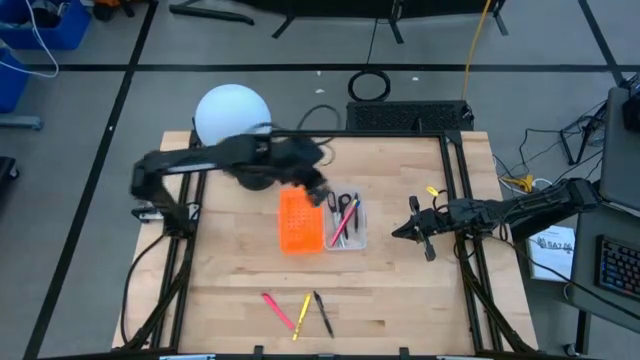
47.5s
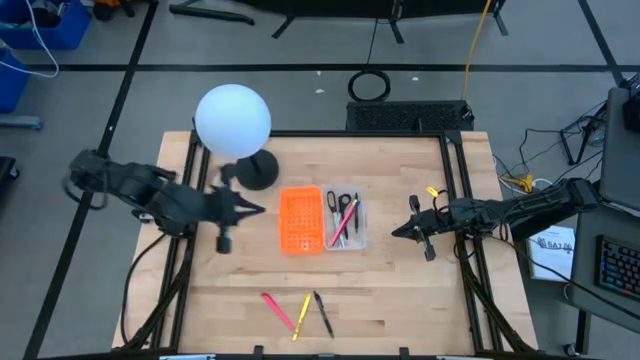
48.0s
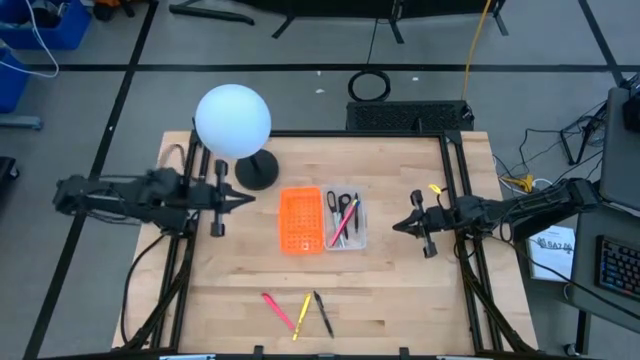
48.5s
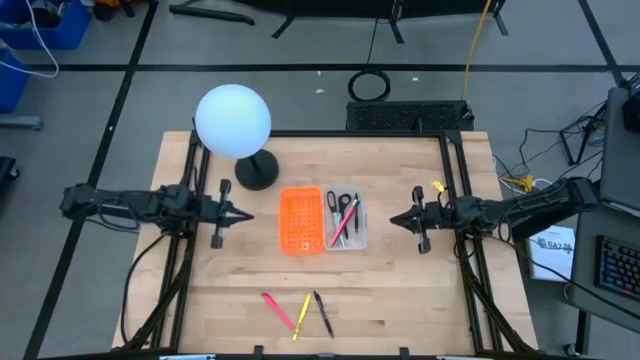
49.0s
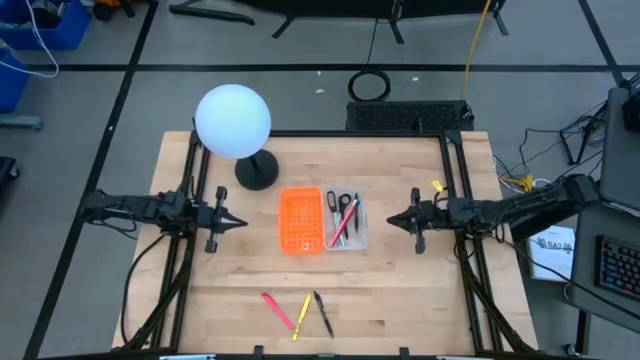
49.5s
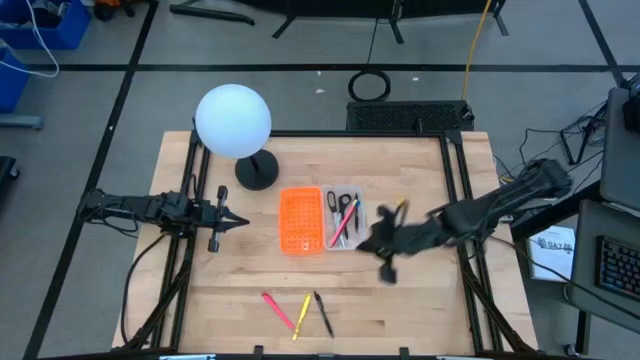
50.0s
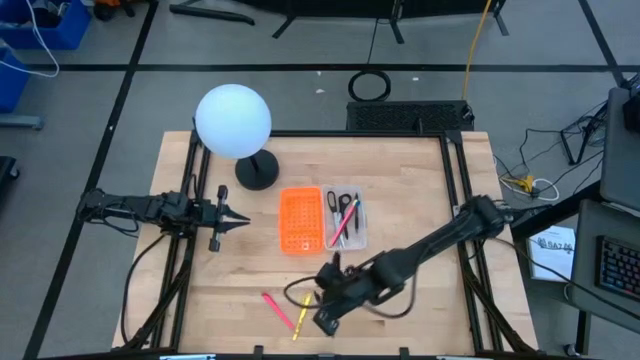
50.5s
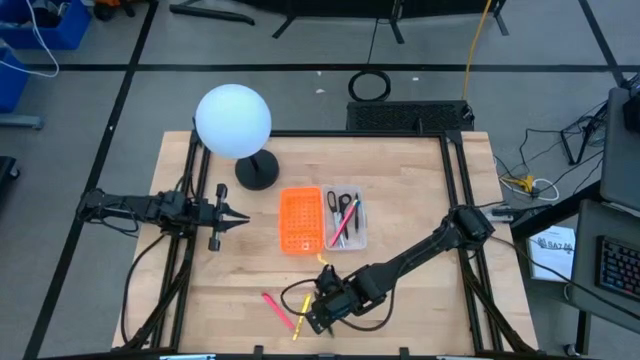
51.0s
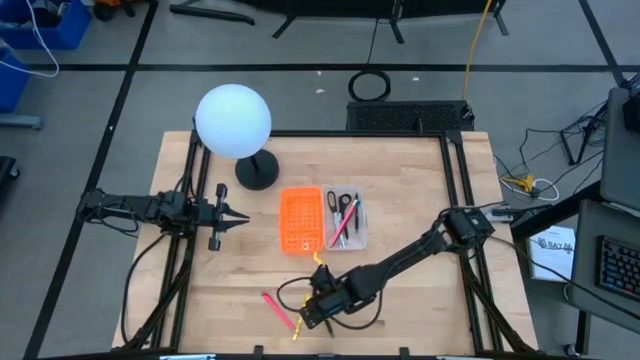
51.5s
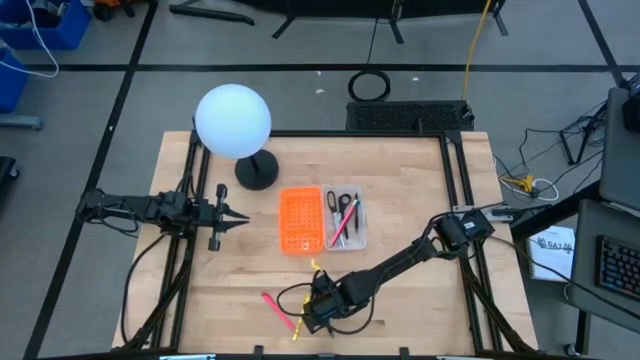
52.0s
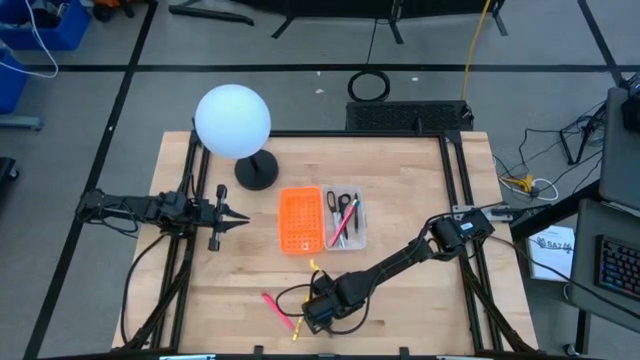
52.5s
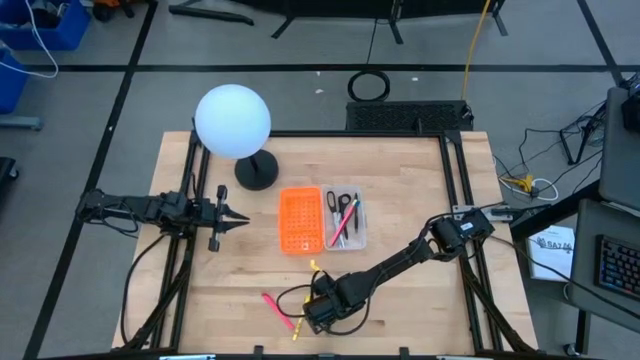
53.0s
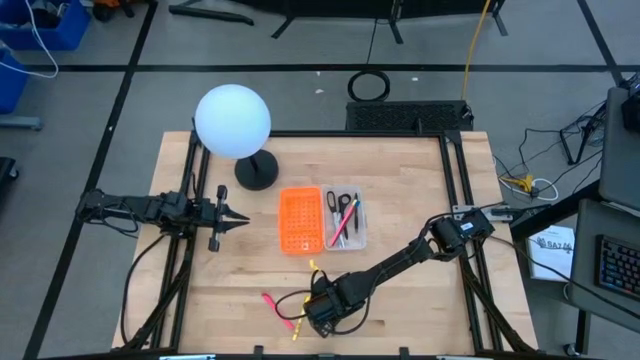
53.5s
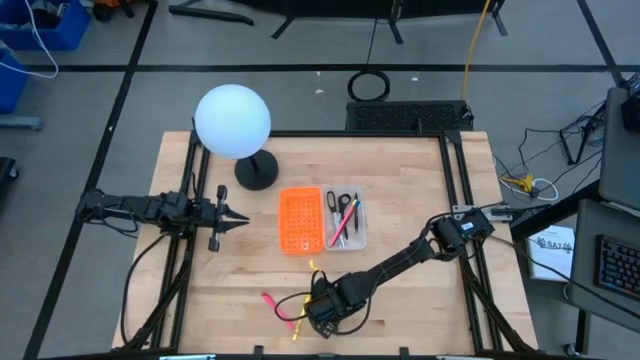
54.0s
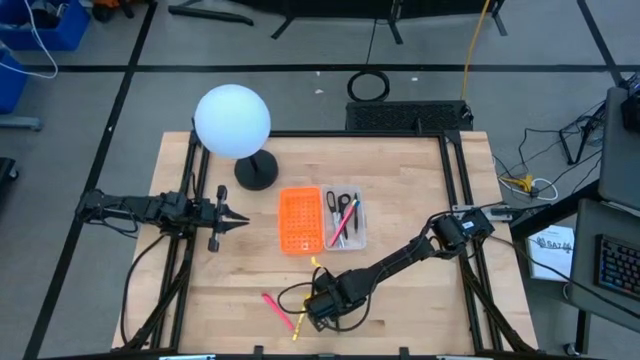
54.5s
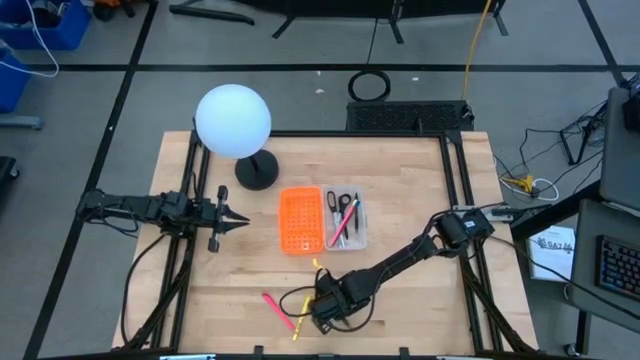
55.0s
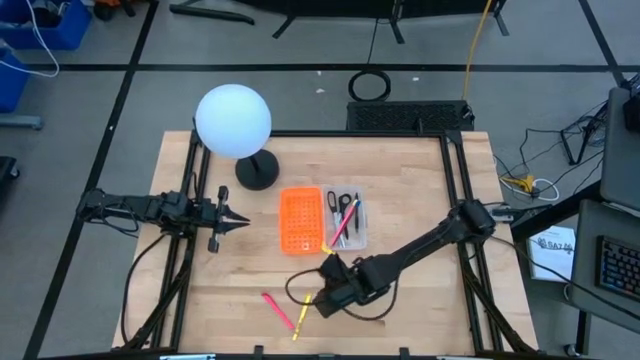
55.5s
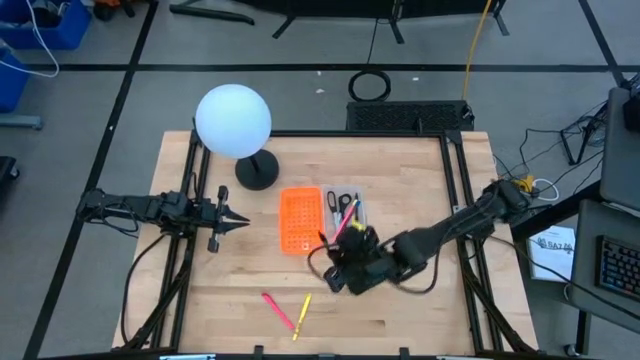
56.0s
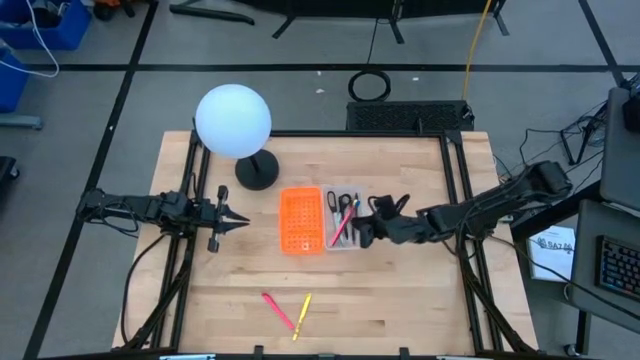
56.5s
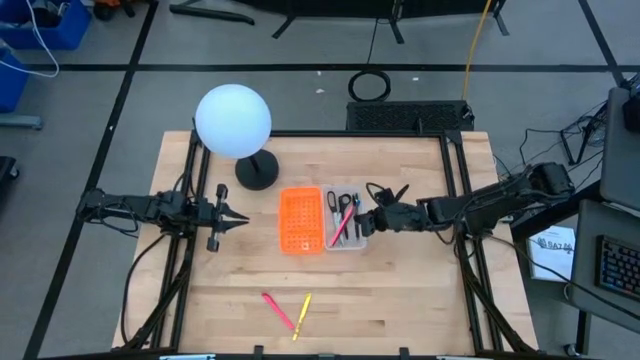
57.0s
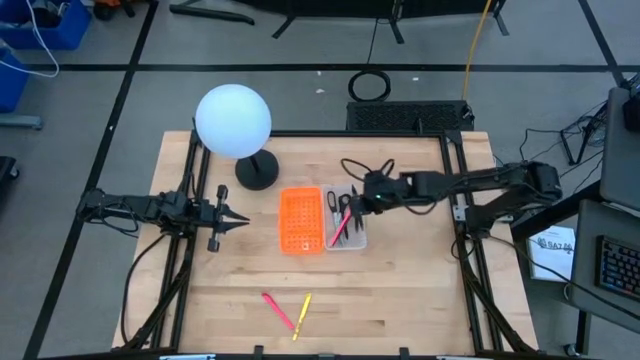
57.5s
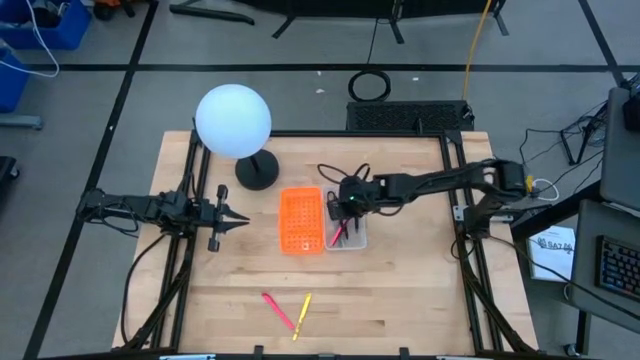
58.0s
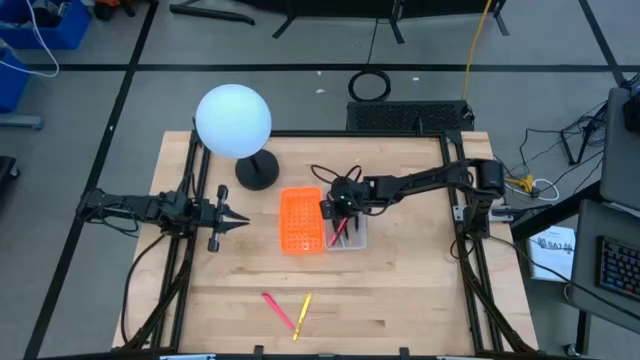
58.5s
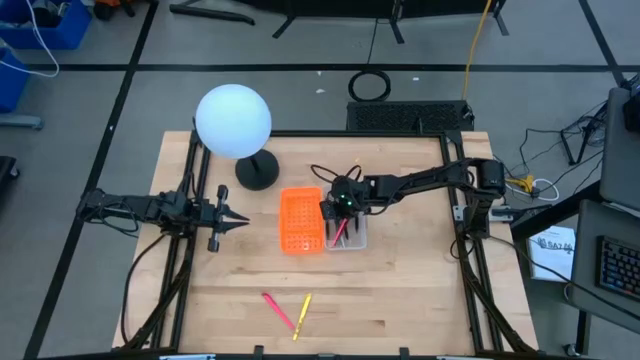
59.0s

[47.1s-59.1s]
Task: Pick & place school supplies into a supply box
Put the black pen into the orange supply box

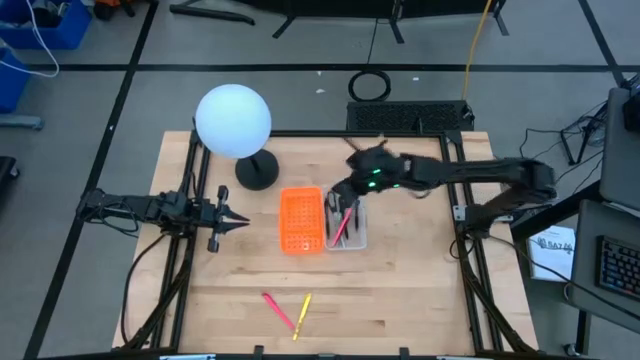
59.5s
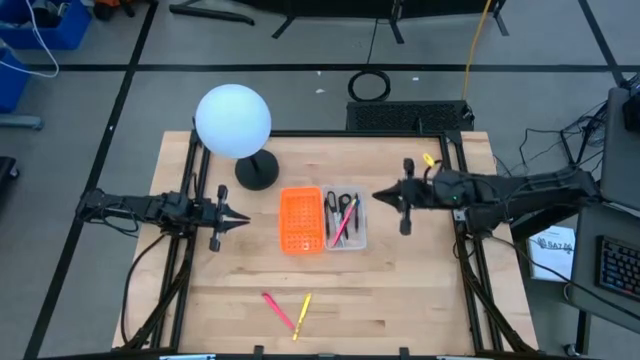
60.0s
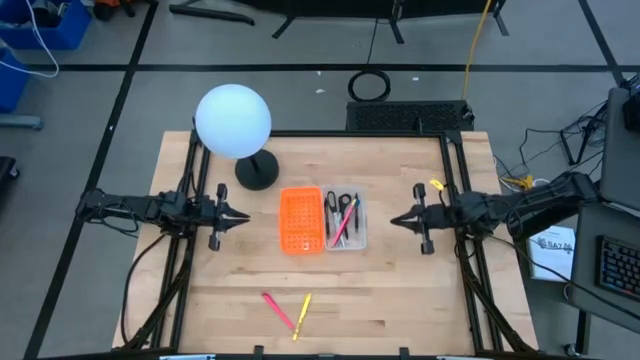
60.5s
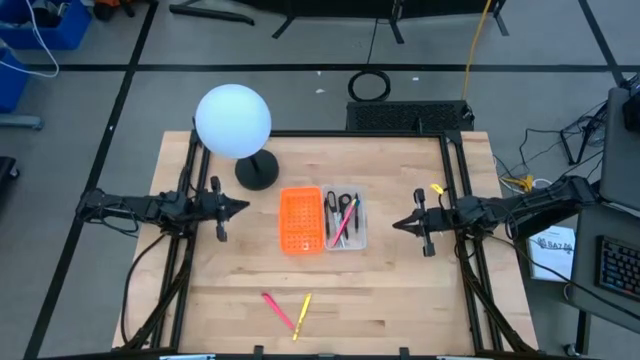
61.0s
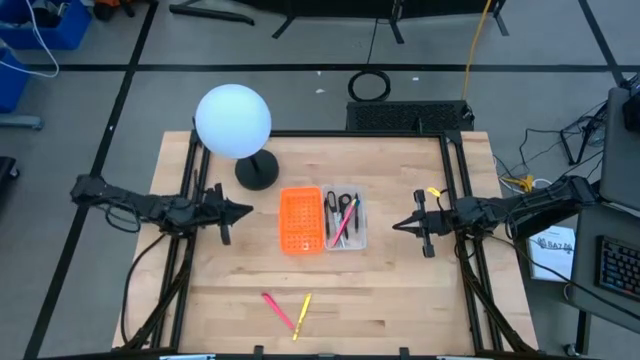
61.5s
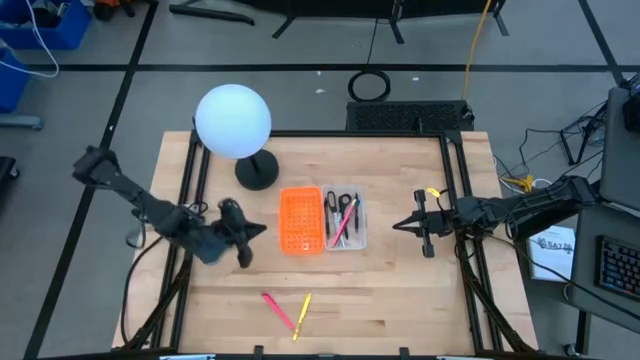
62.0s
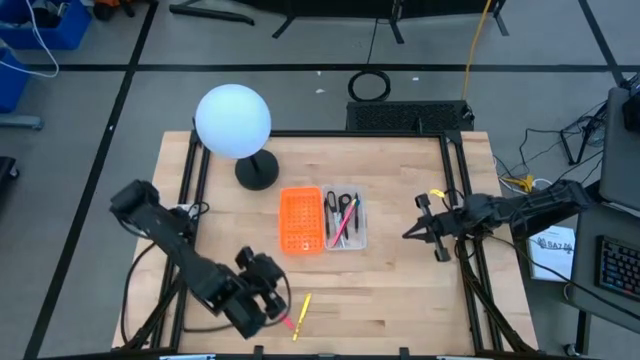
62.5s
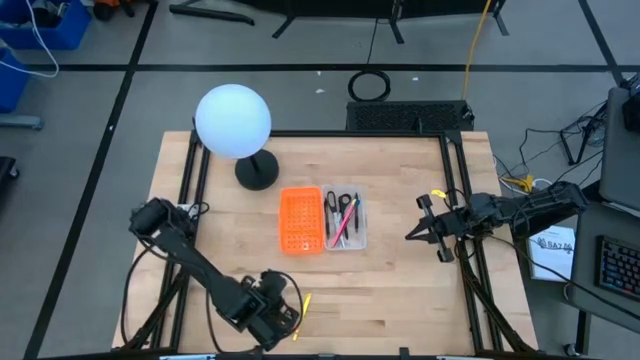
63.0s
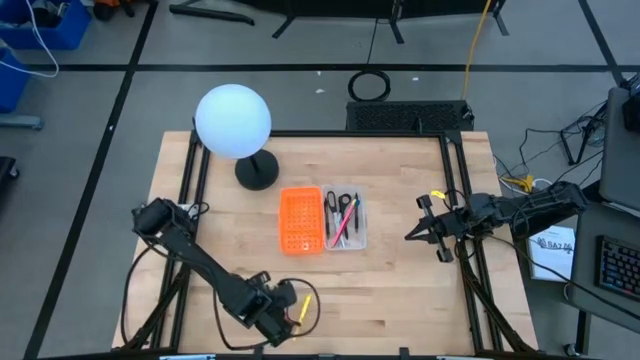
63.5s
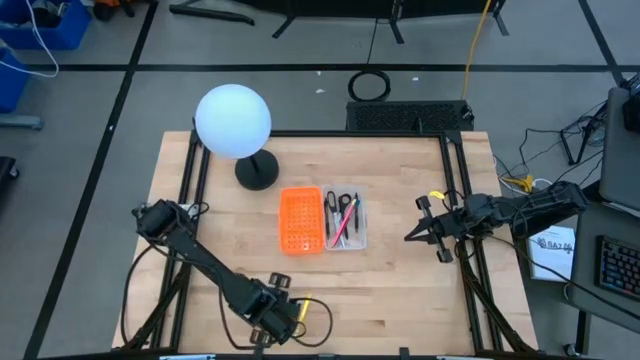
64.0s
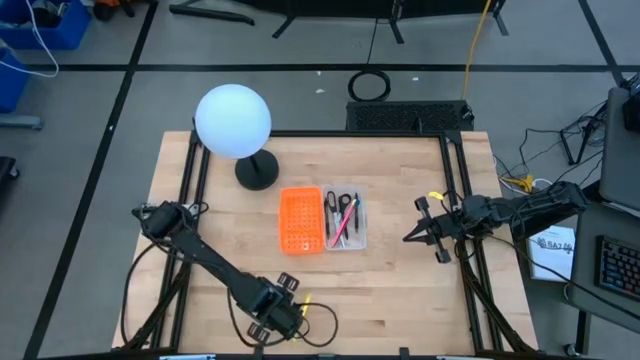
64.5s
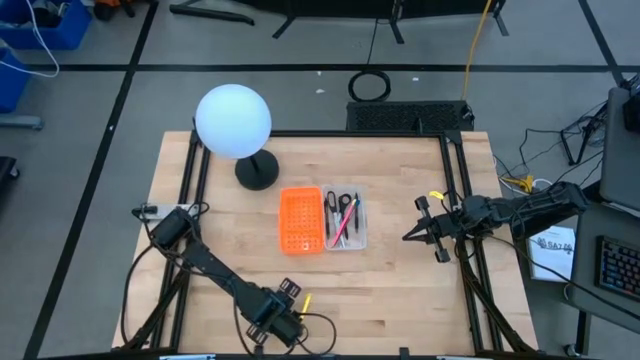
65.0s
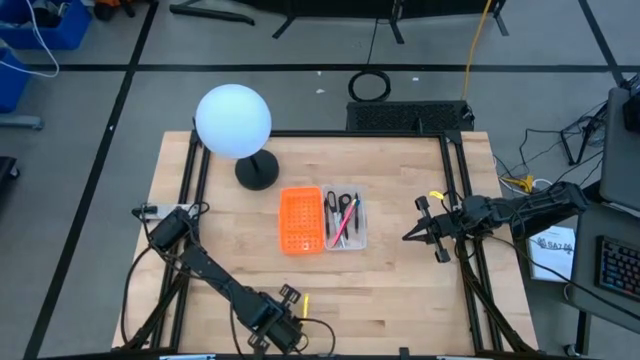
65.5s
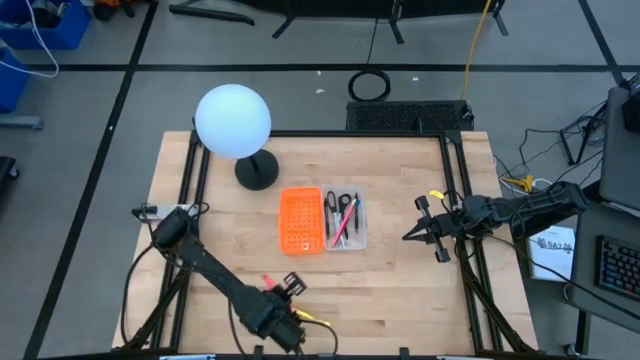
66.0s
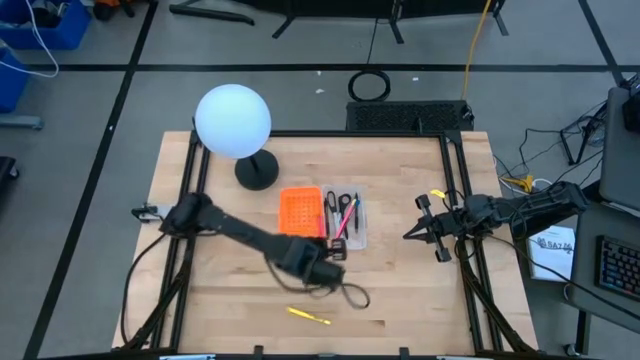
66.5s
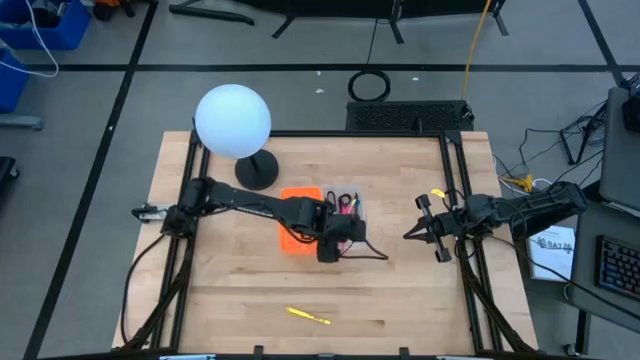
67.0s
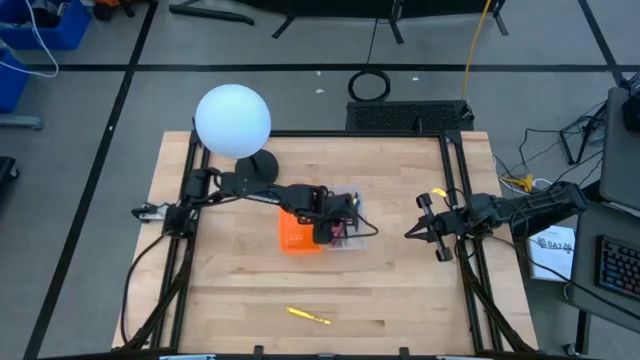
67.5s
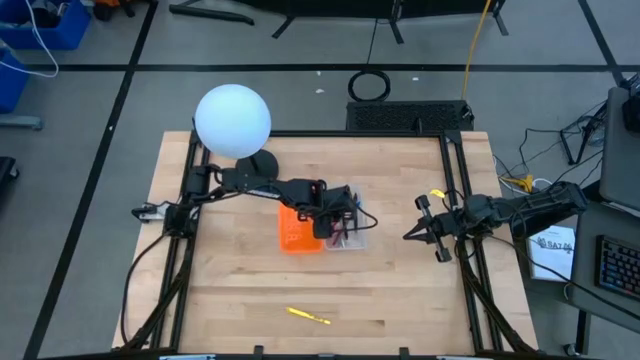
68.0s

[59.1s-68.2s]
Put the pink pen into the orange supply box
